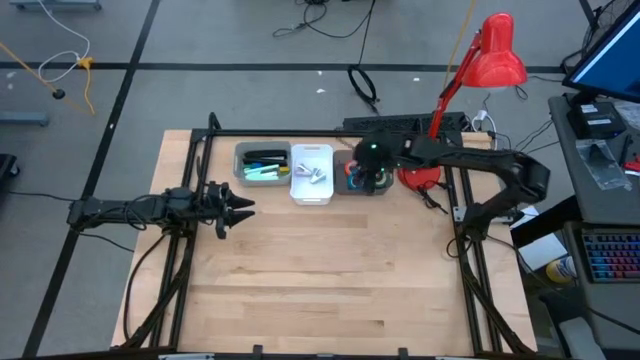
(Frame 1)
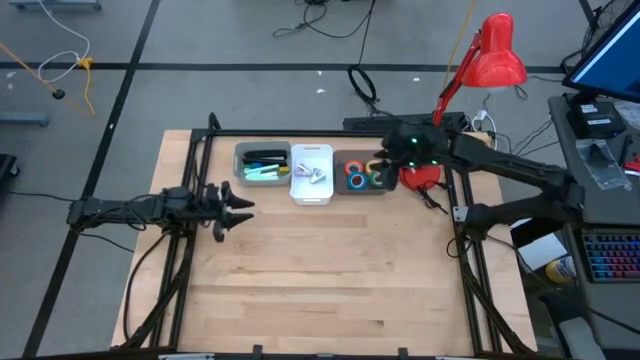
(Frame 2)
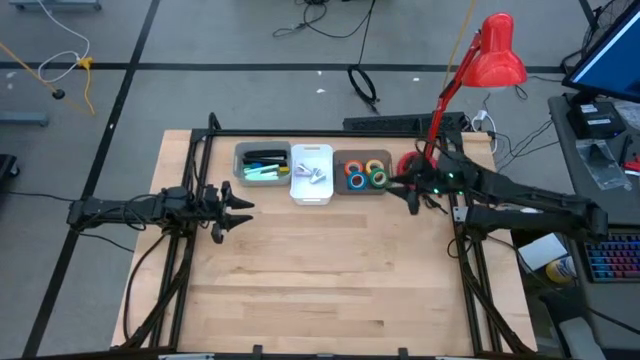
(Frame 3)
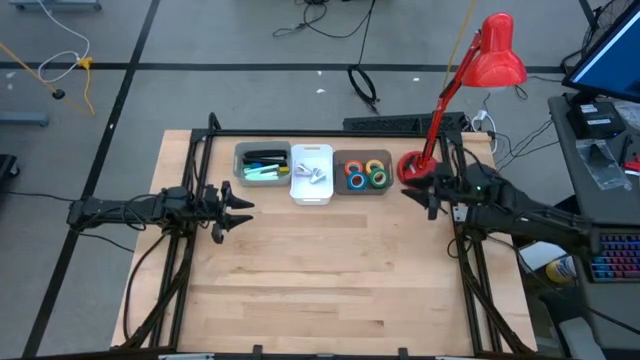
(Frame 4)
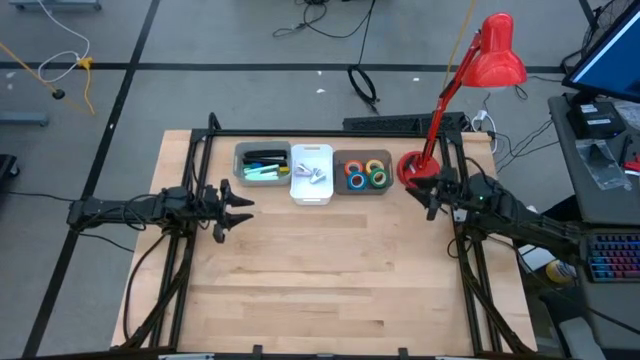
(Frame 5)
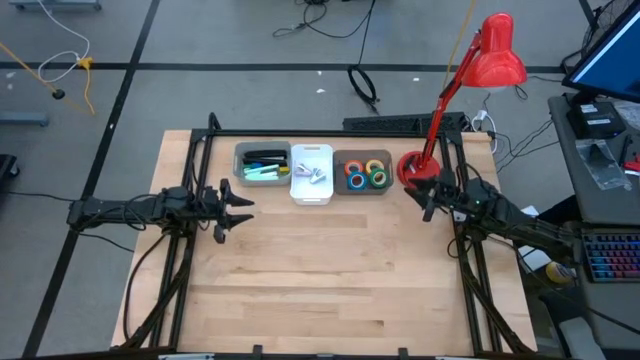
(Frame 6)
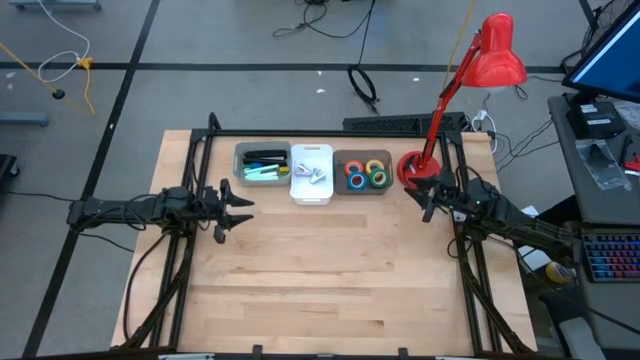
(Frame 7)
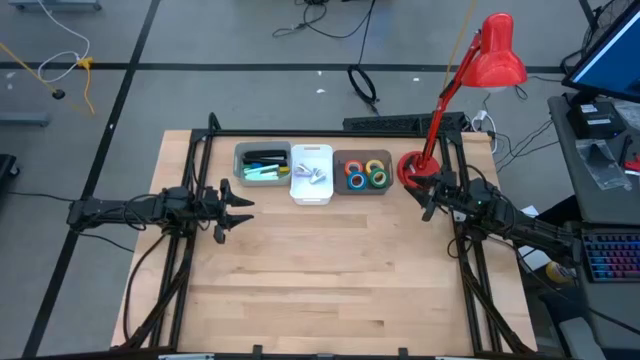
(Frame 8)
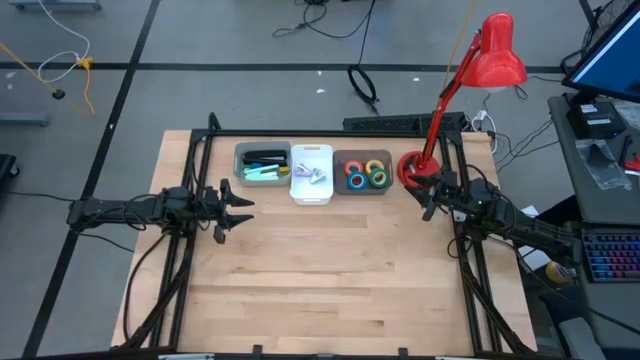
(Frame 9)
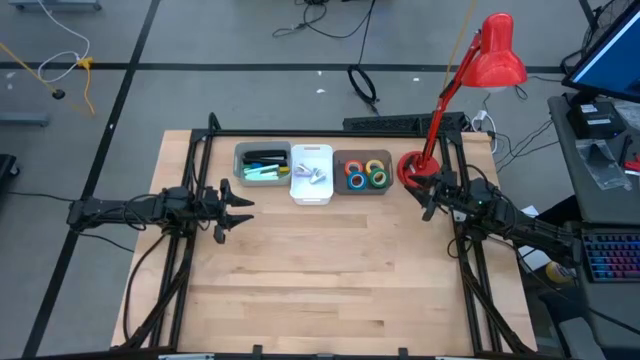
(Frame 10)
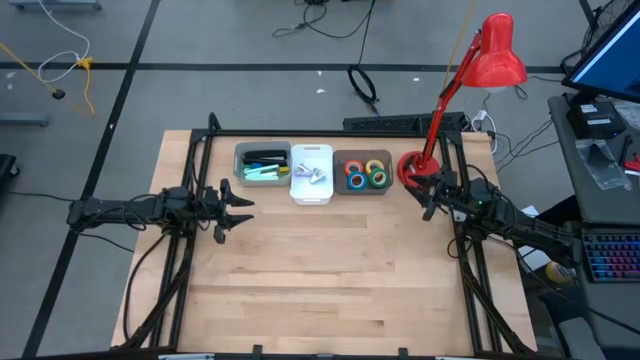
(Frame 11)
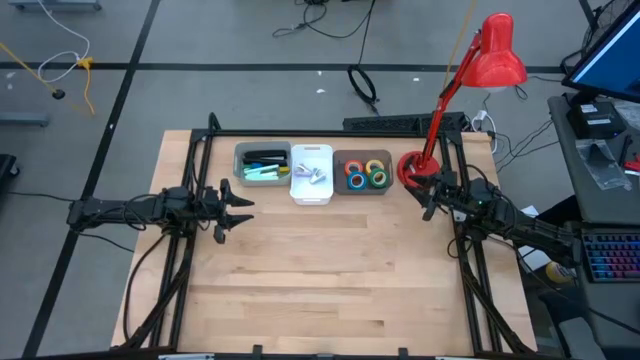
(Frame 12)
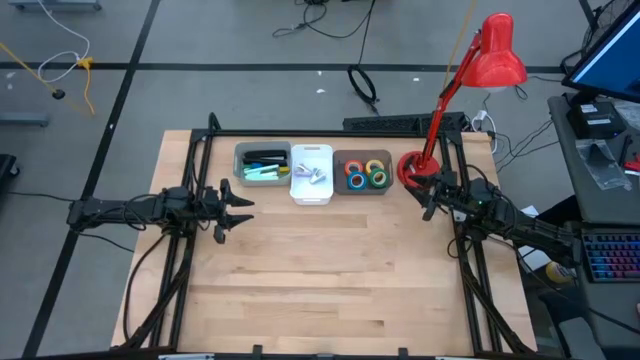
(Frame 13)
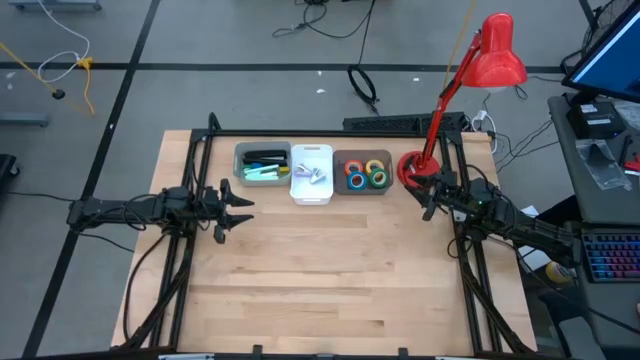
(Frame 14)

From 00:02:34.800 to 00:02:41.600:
Task: Pick and place Stapler, Stapler remover, tape
Return to Home Position

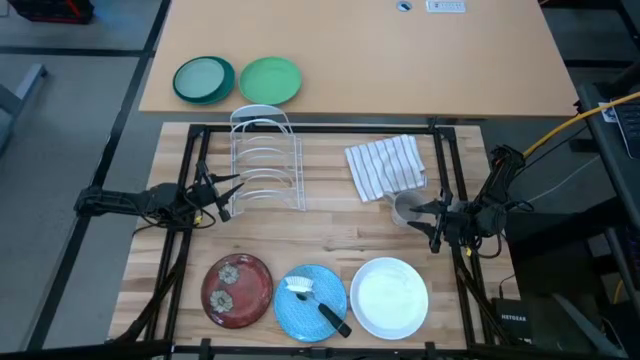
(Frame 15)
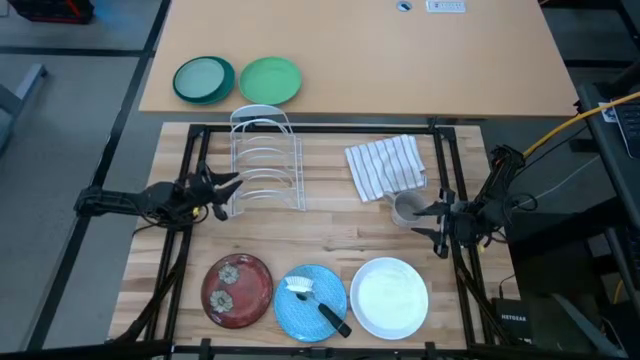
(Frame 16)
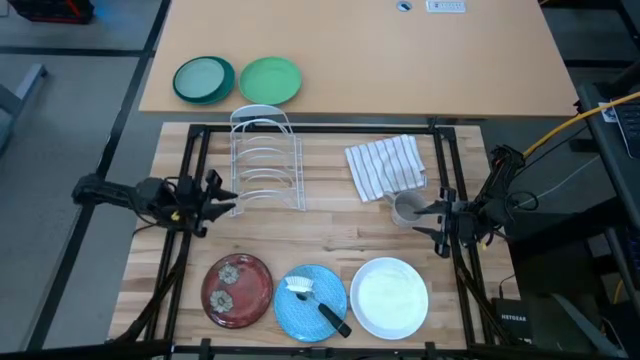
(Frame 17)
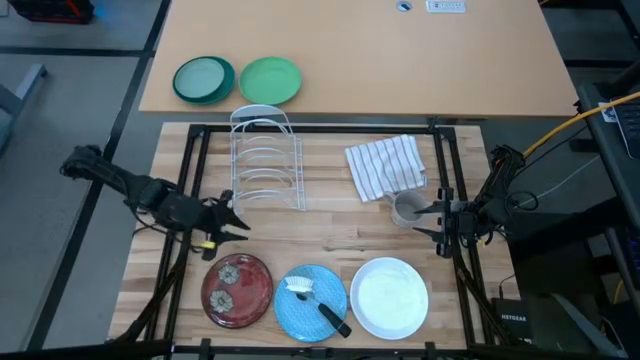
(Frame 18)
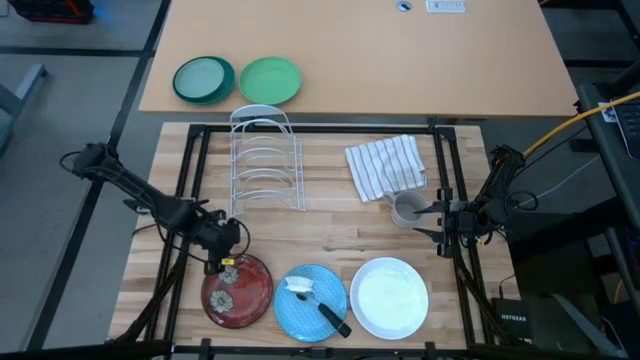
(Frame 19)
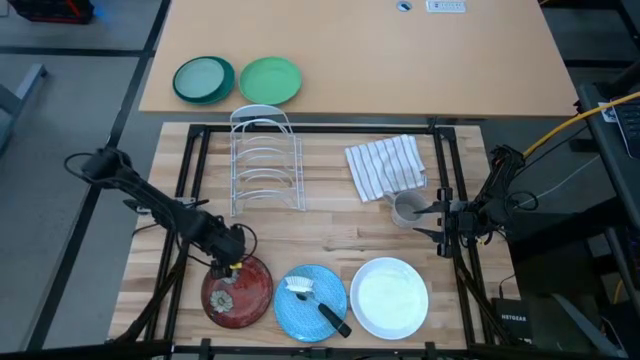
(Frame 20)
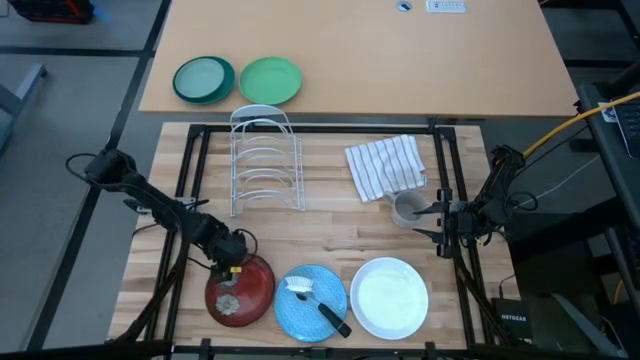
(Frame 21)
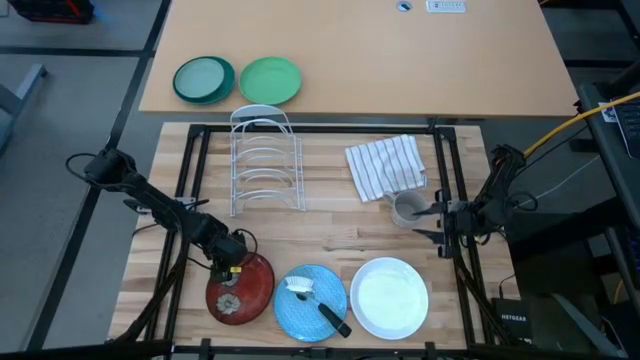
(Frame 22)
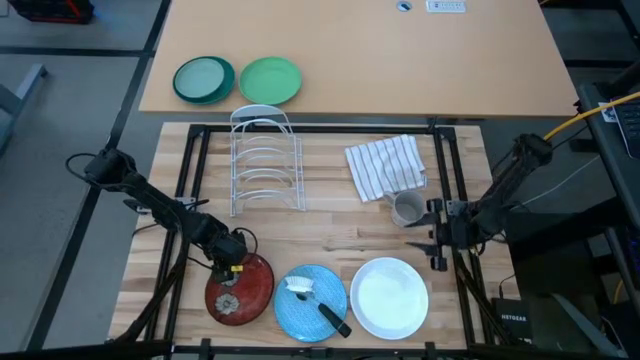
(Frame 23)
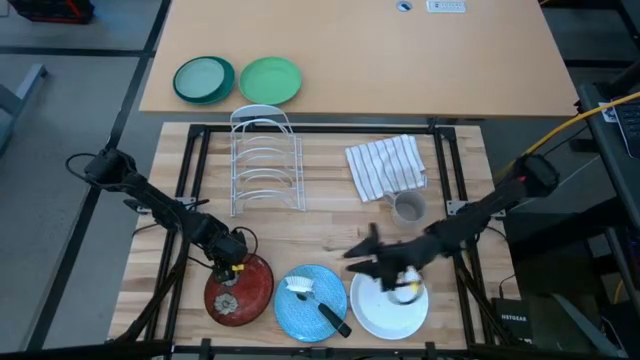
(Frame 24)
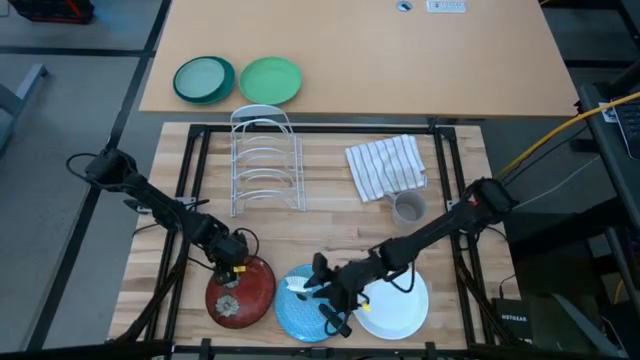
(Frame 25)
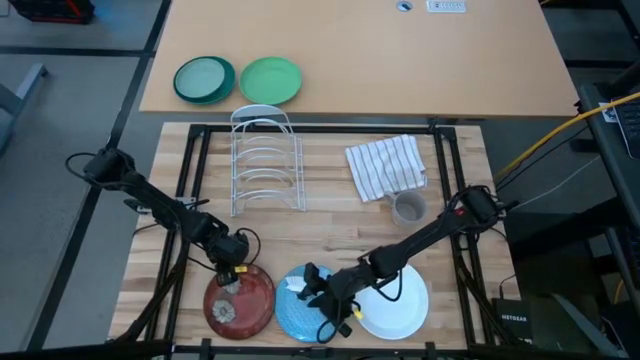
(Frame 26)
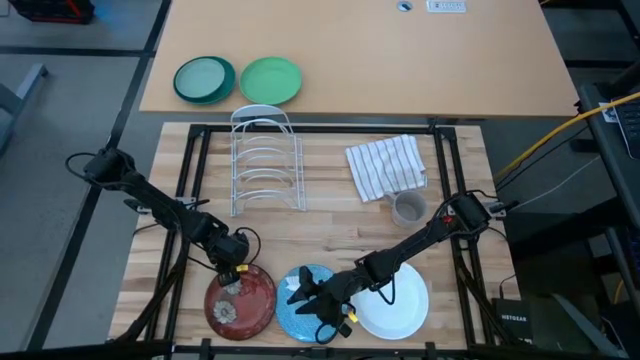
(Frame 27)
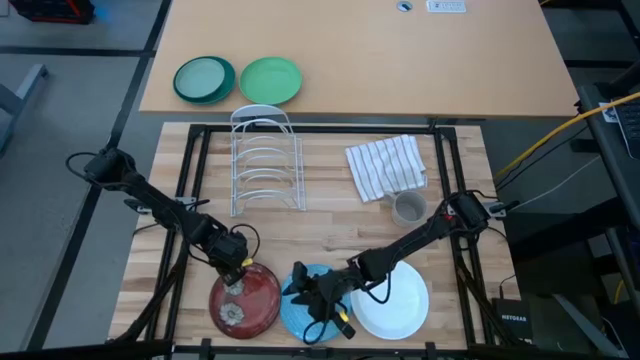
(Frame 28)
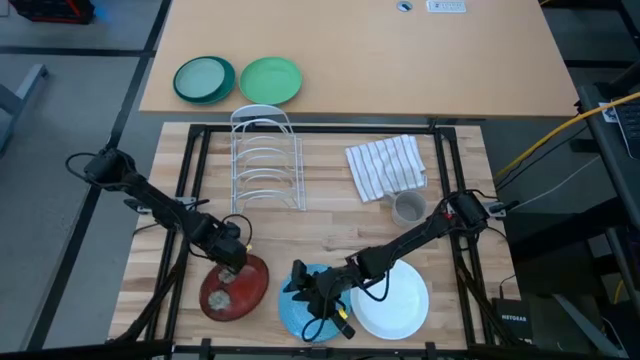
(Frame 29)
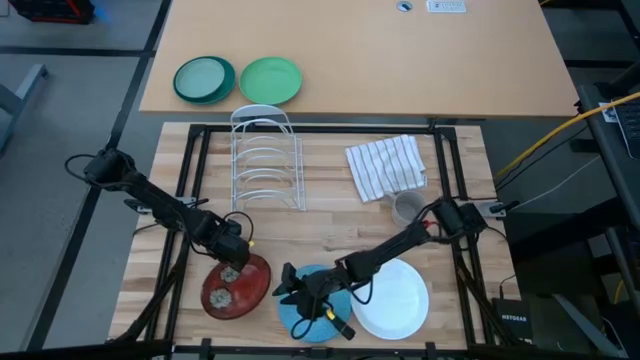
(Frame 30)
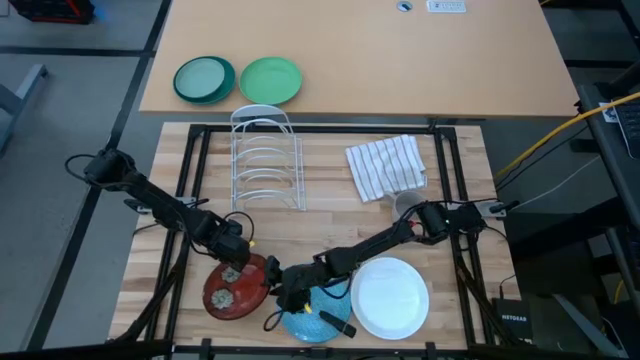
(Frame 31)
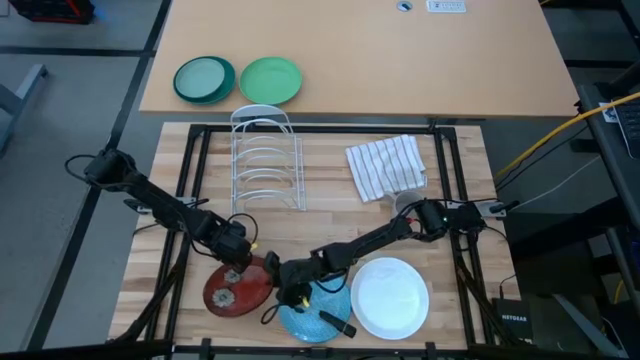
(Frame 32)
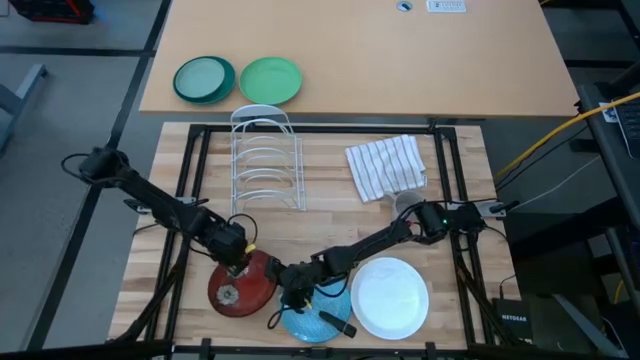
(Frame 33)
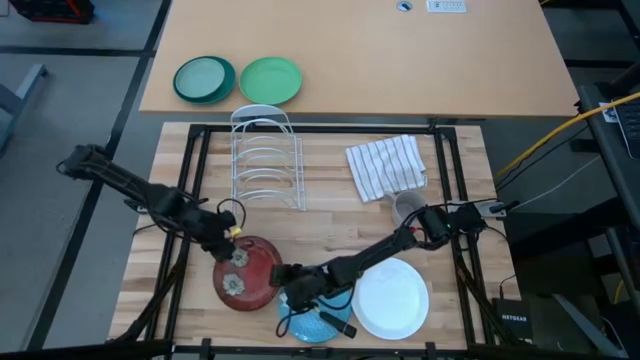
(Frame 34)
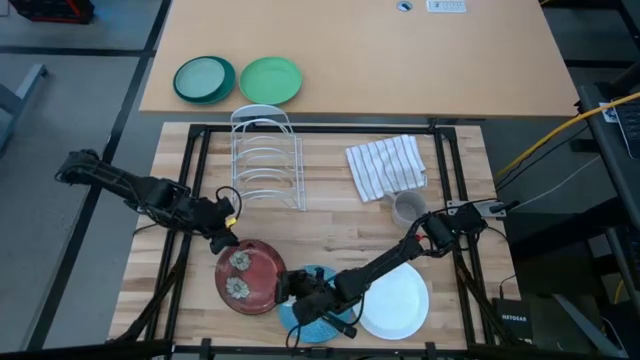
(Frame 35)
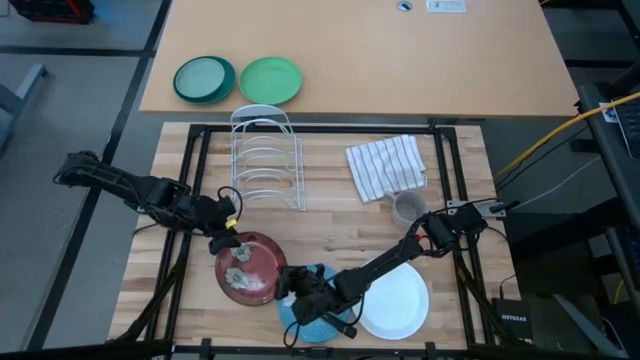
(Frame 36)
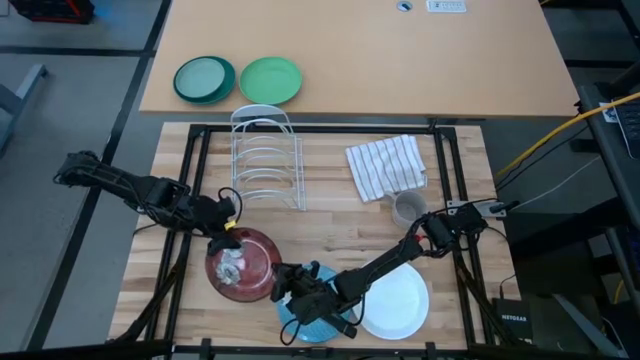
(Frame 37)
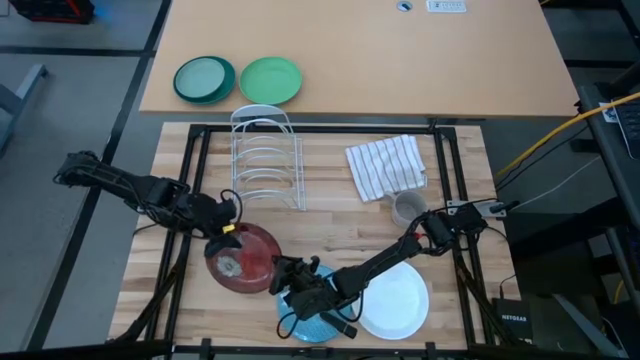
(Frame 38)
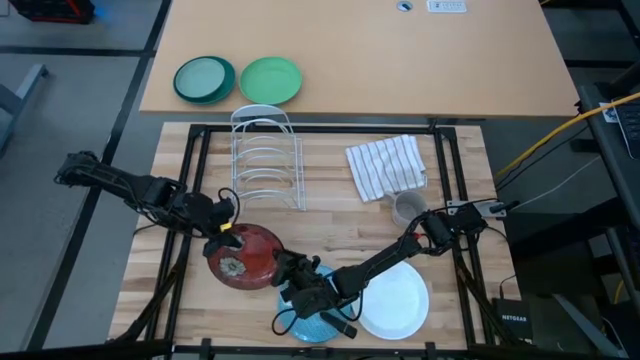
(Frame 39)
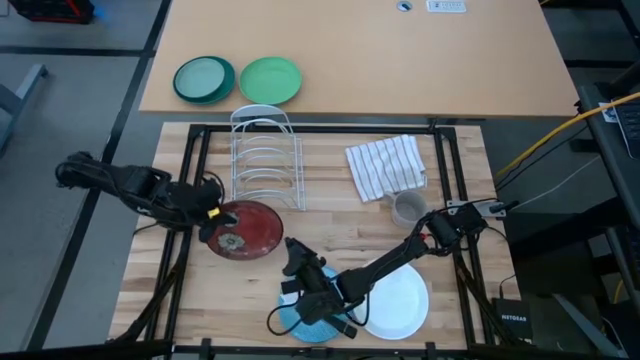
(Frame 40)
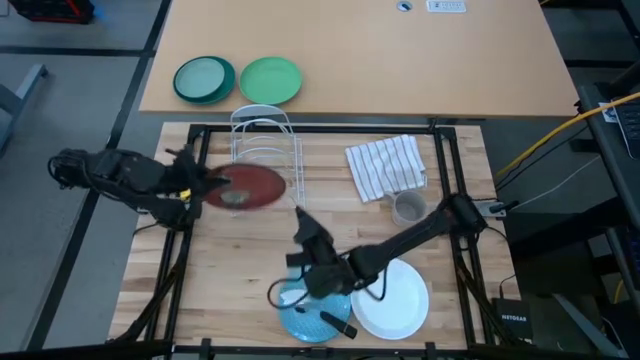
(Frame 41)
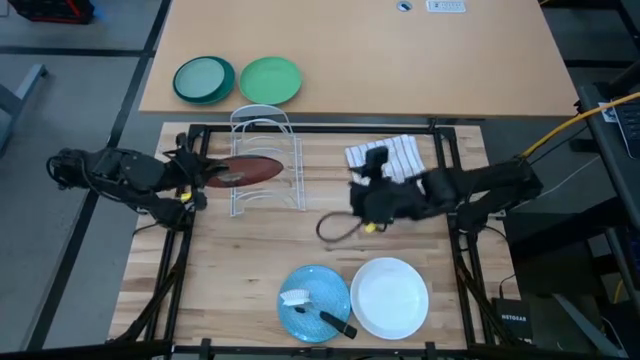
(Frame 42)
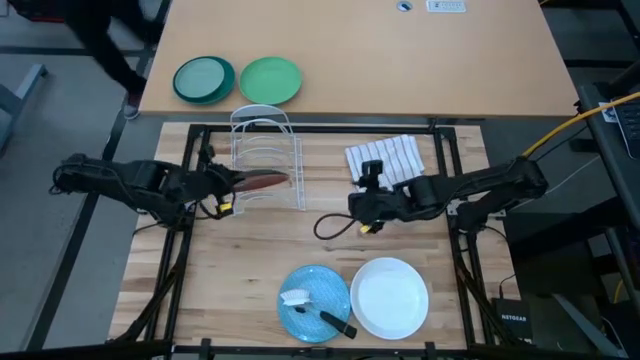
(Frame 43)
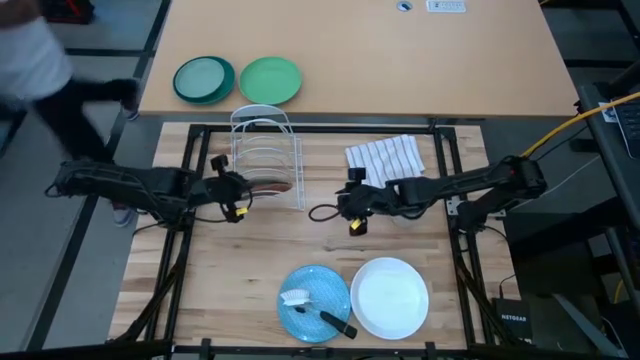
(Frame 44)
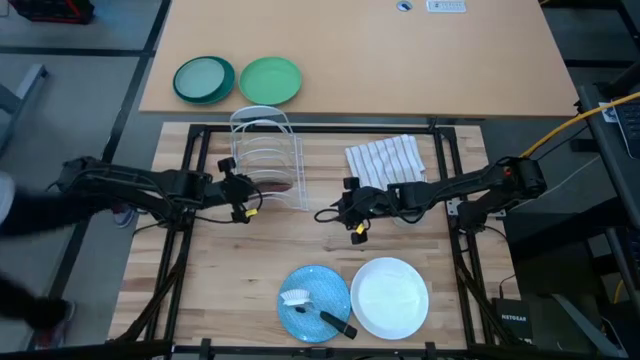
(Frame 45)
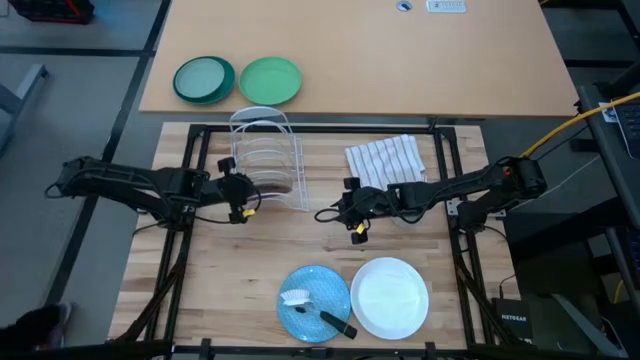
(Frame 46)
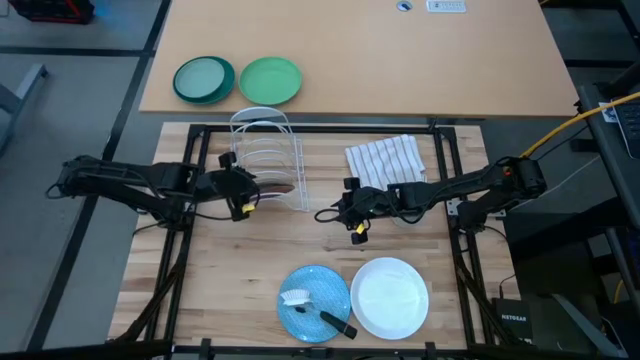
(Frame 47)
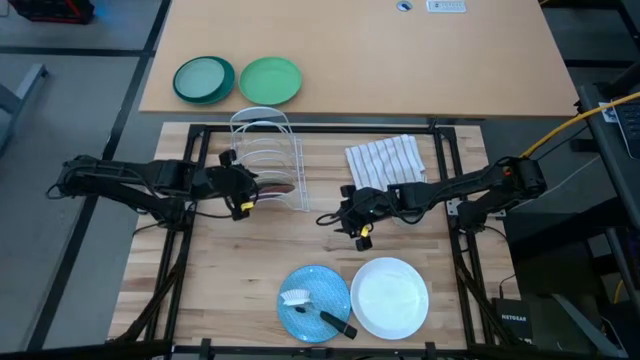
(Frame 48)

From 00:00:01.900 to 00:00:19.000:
Task: Sort dishes
Put the red patterned plate in the dish rack
